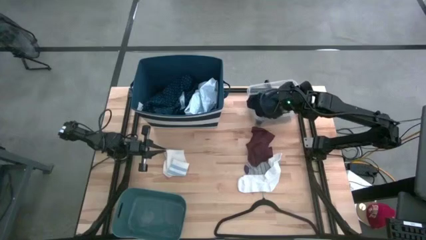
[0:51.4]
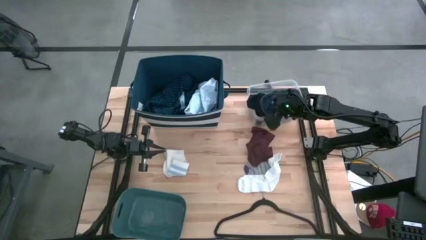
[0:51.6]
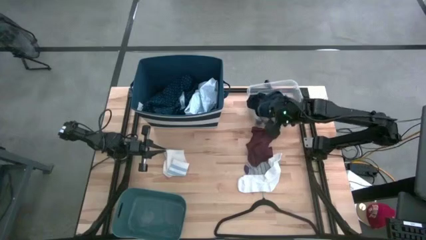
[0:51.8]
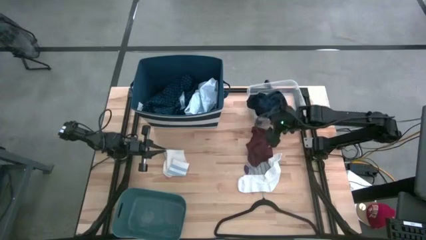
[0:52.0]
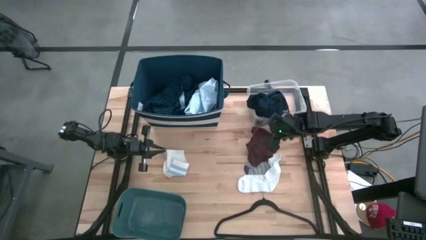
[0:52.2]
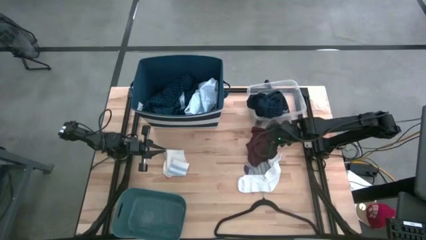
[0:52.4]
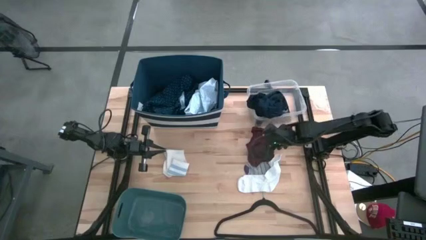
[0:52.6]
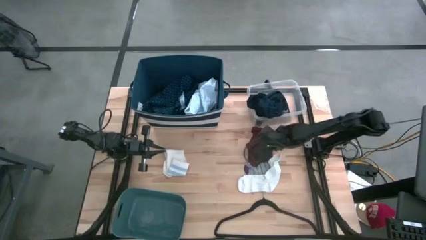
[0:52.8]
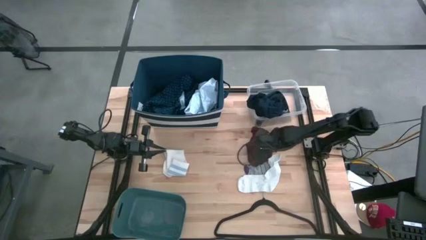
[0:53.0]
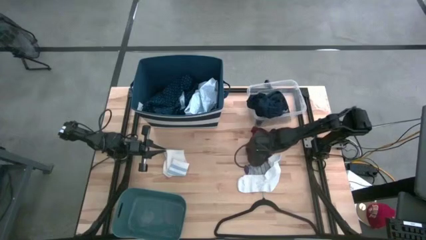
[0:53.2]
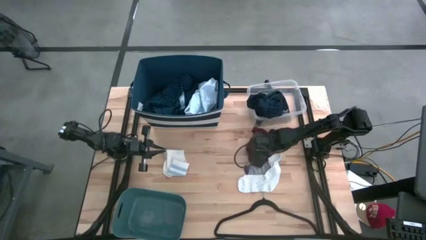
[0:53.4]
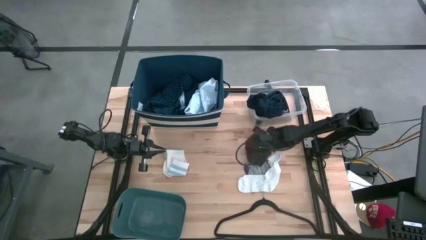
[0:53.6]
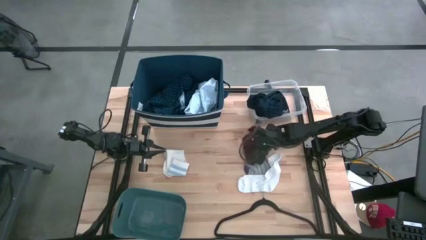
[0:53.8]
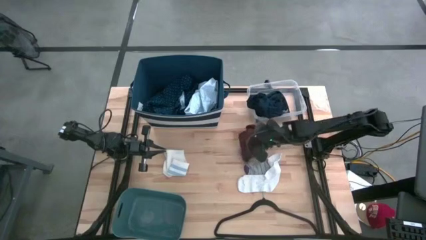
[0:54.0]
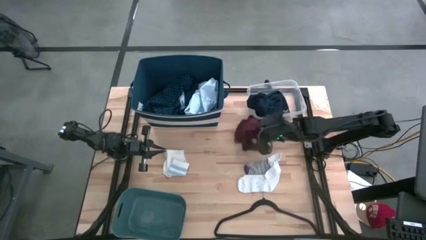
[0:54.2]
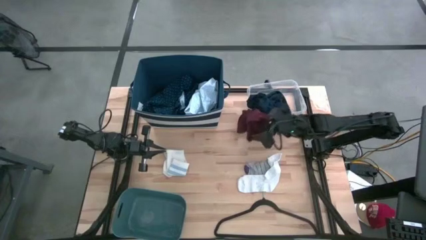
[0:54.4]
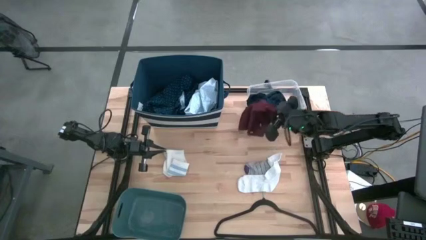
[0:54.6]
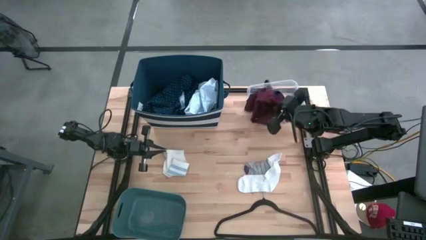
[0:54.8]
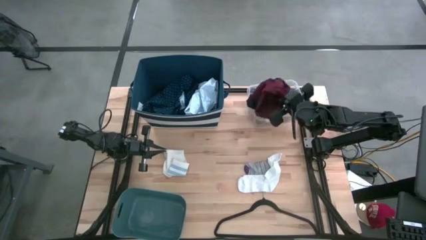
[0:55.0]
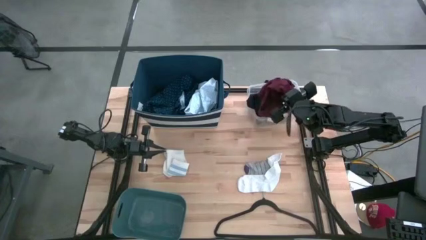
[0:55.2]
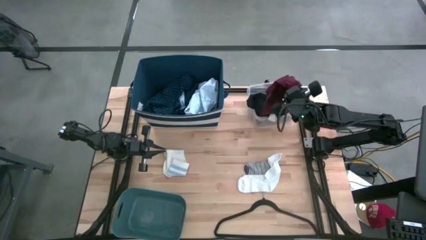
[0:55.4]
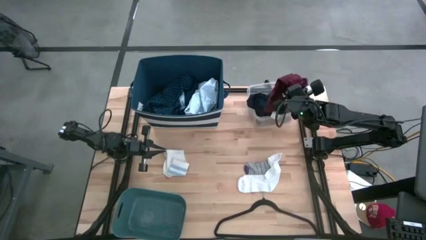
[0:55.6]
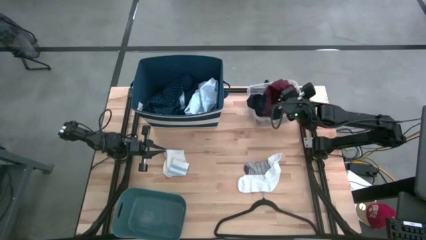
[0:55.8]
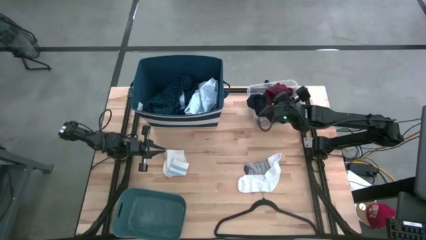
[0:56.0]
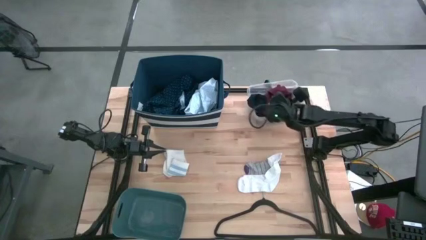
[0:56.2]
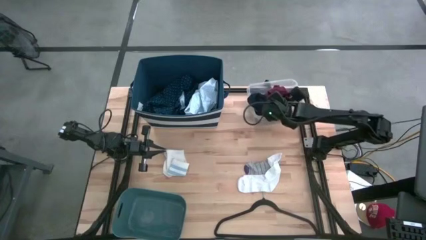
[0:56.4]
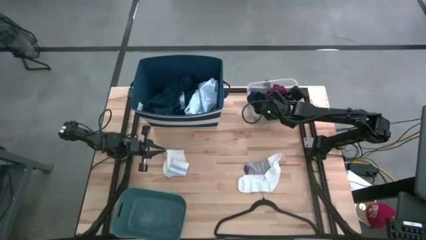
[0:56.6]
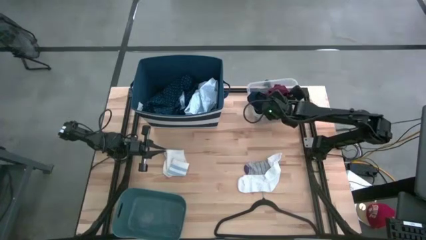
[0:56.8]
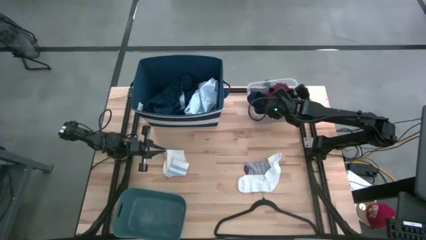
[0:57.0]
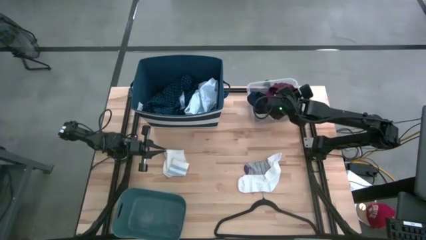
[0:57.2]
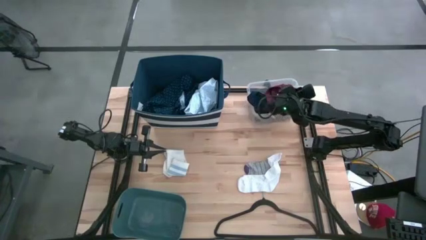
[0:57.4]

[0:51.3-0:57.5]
Task: Pick & Place Cloths
Put the red underwear into the transparent bin

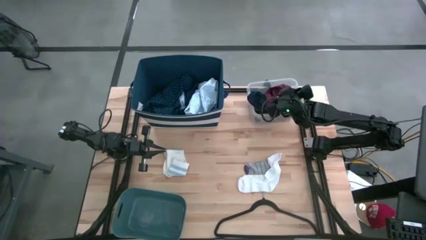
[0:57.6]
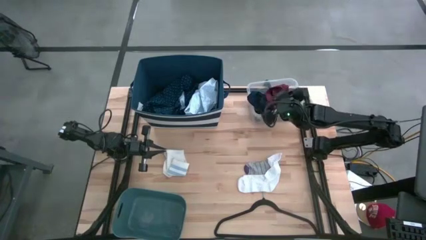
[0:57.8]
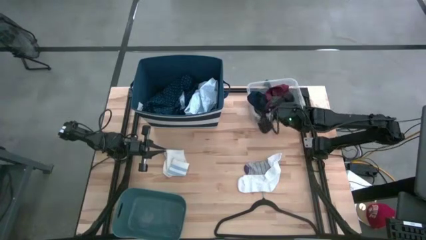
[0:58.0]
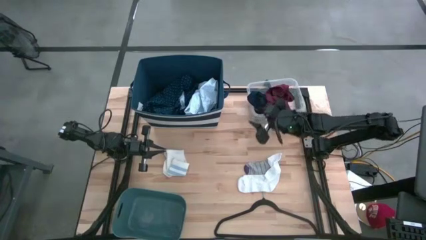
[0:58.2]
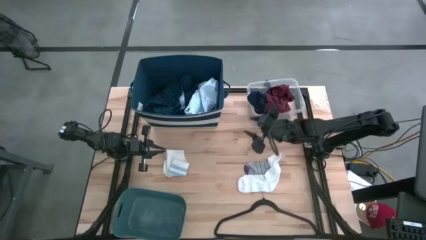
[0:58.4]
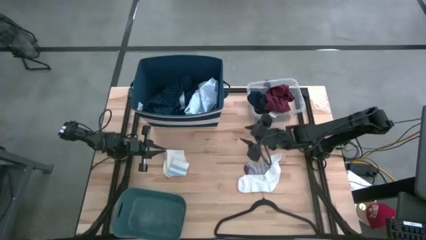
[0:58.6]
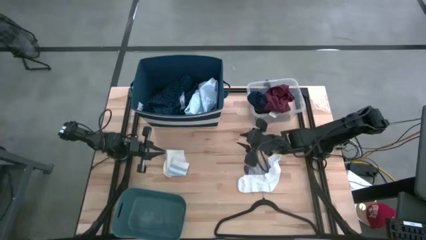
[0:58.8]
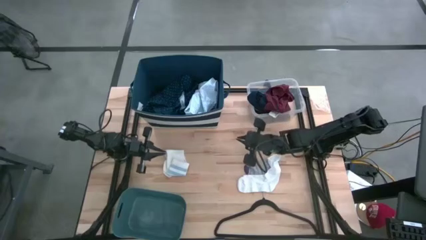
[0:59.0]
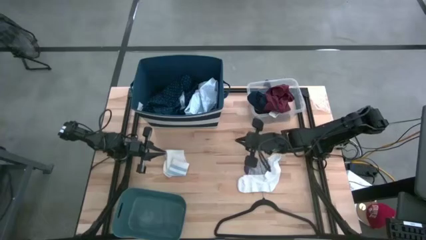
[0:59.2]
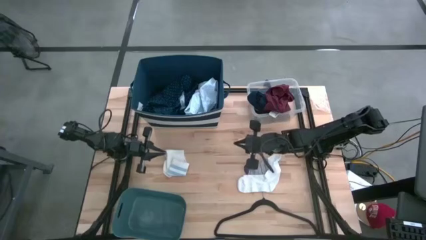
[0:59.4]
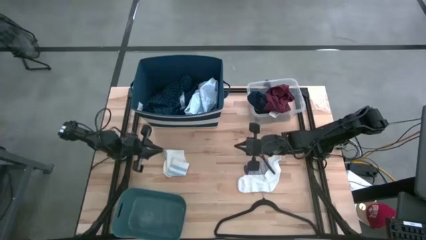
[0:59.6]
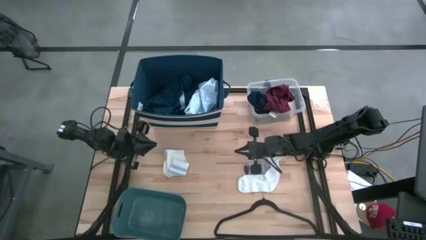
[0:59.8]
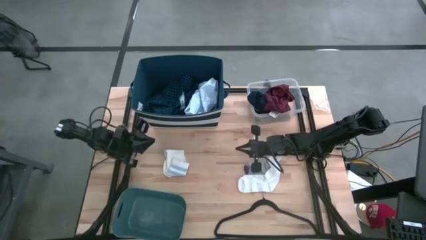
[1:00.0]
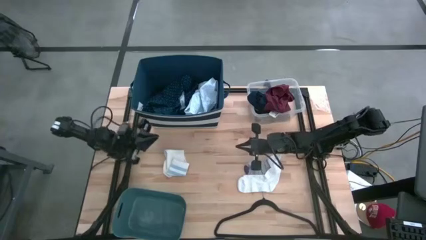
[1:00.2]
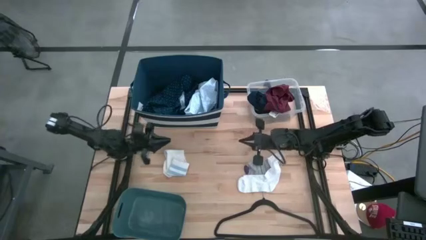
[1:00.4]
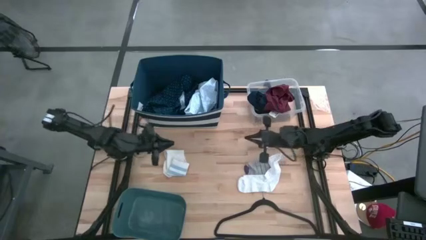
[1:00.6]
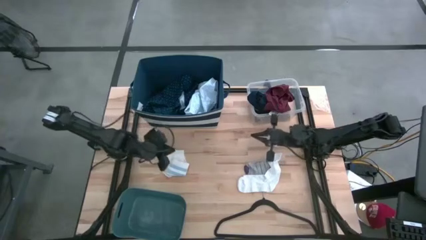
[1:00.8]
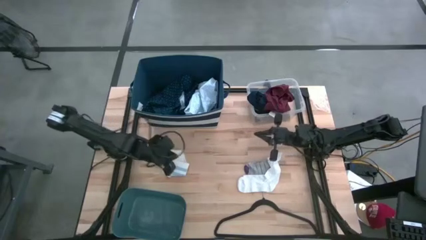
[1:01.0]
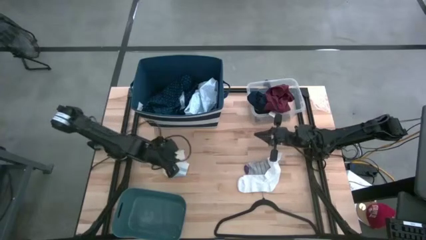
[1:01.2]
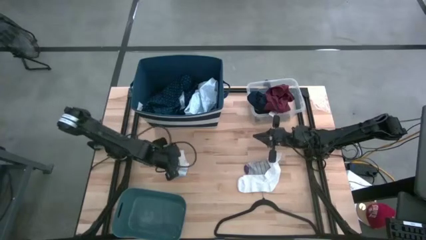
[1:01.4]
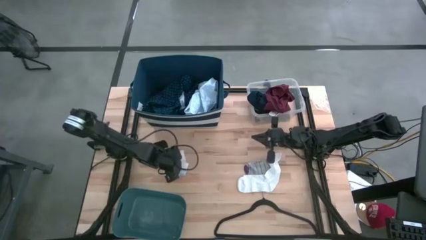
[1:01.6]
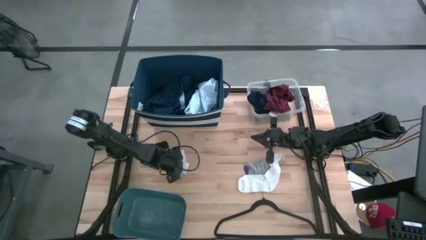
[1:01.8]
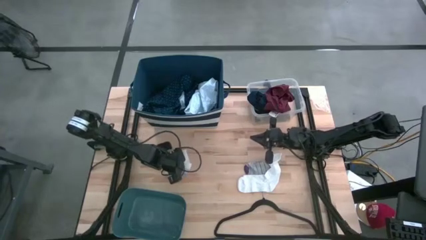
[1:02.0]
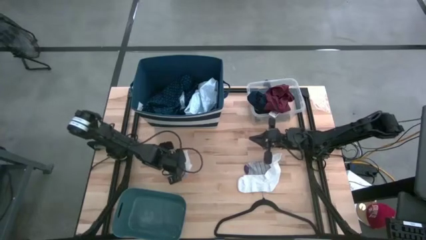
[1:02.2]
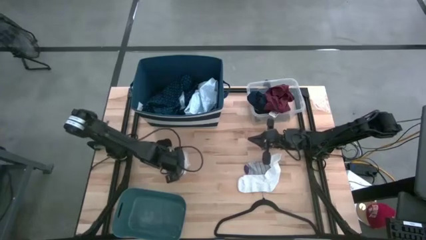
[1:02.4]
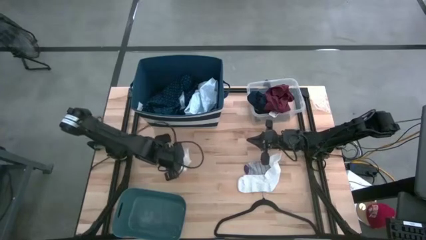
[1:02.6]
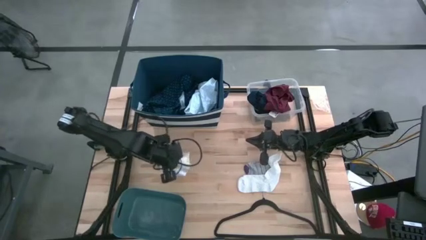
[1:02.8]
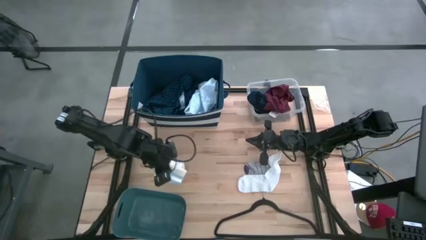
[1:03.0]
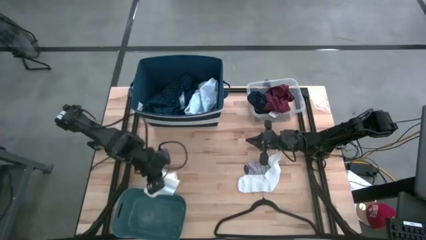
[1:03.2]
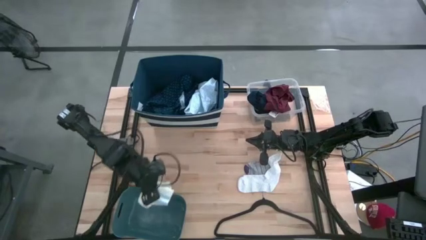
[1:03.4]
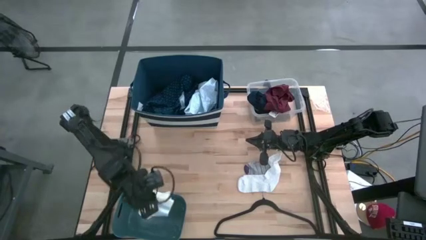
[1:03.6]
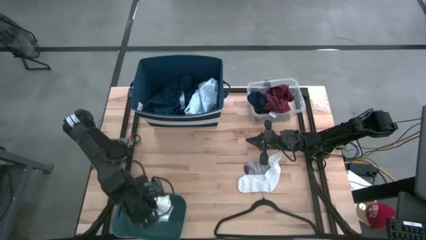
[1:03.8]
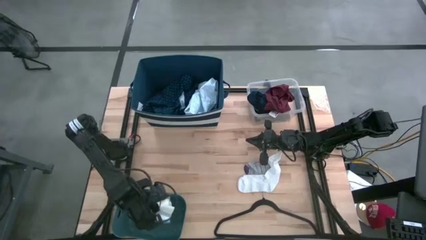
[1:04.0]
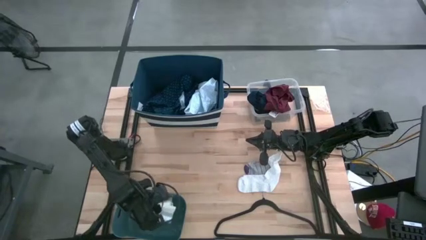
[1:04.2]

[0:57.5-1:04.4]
Put the left white sock into the blue bin

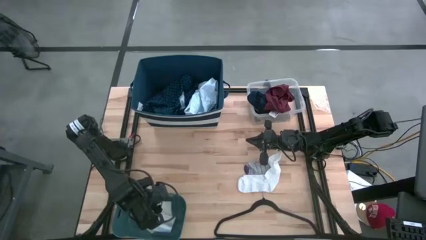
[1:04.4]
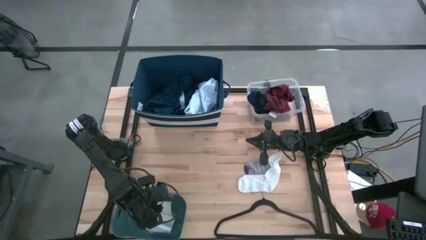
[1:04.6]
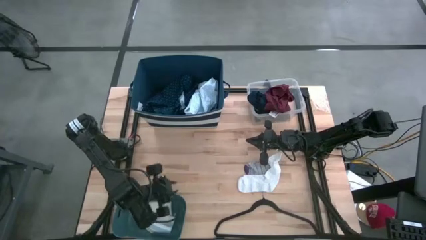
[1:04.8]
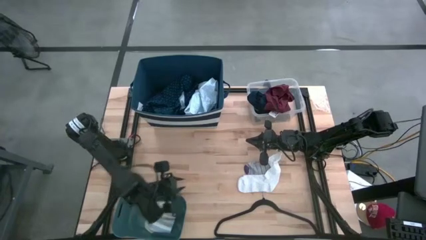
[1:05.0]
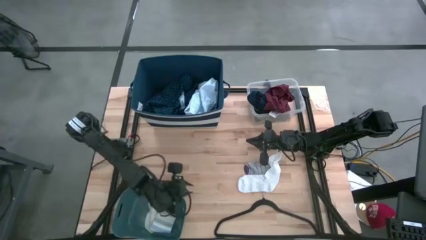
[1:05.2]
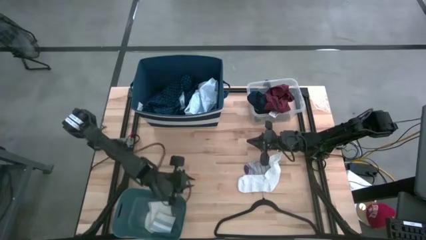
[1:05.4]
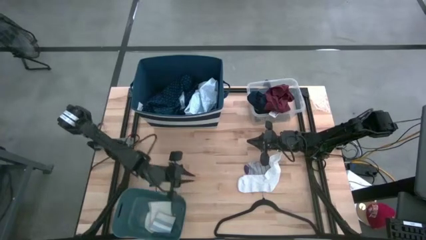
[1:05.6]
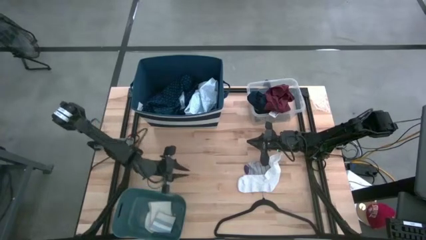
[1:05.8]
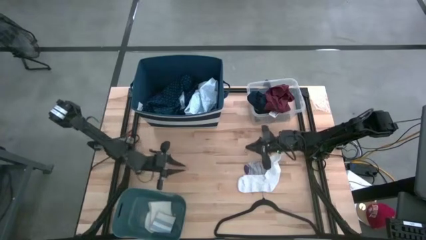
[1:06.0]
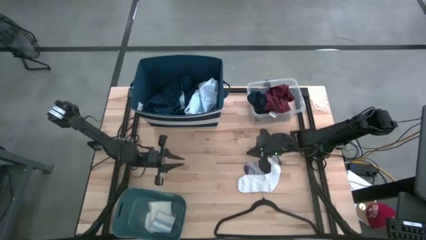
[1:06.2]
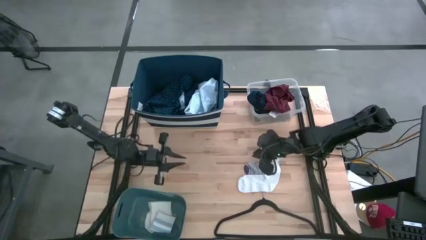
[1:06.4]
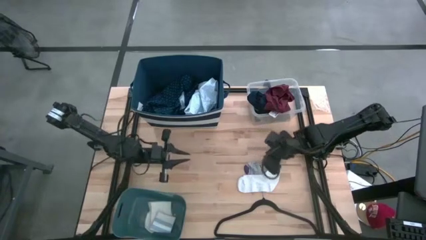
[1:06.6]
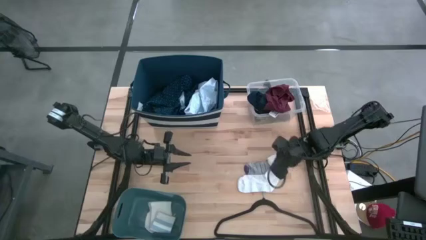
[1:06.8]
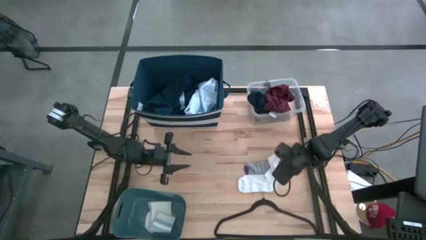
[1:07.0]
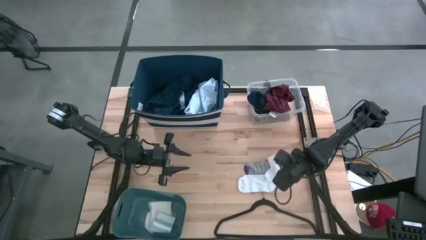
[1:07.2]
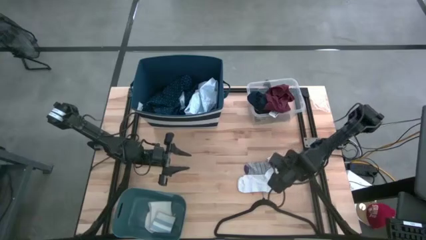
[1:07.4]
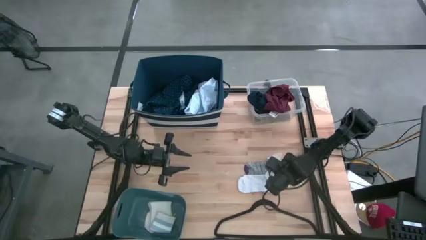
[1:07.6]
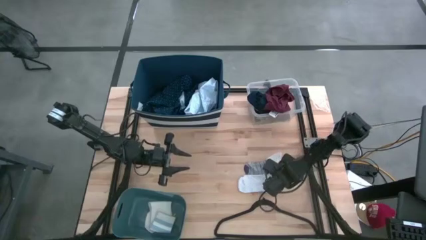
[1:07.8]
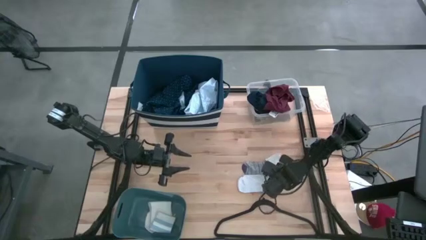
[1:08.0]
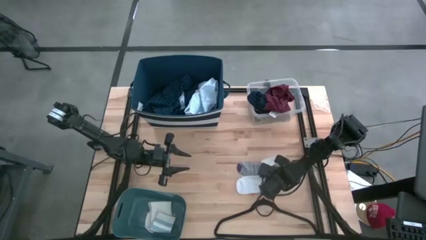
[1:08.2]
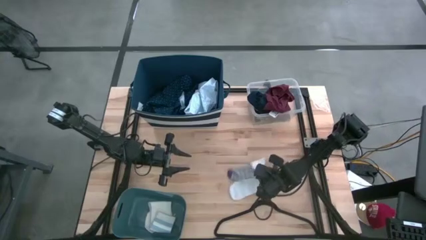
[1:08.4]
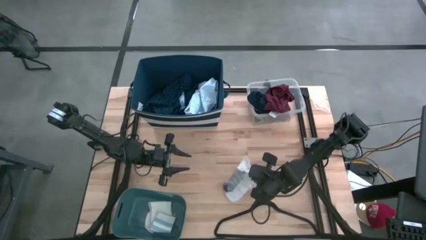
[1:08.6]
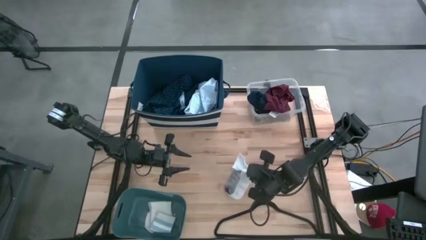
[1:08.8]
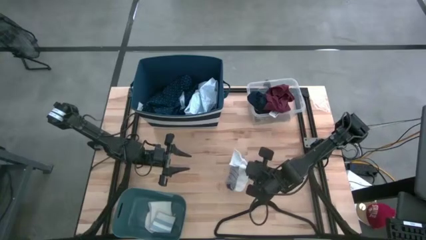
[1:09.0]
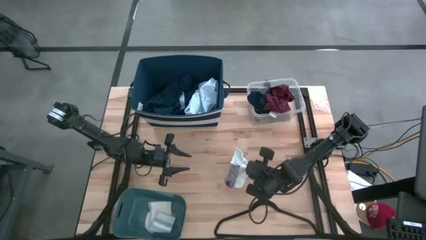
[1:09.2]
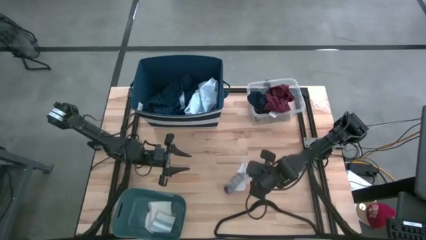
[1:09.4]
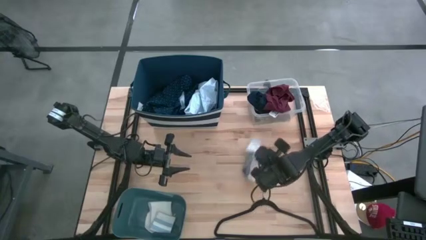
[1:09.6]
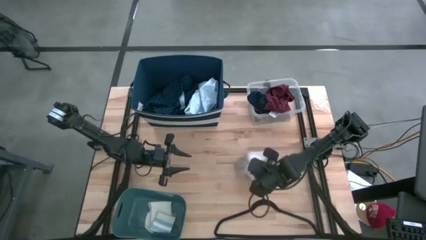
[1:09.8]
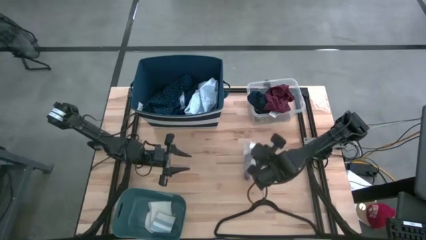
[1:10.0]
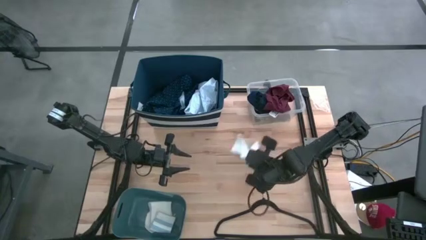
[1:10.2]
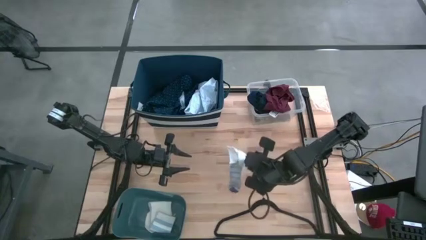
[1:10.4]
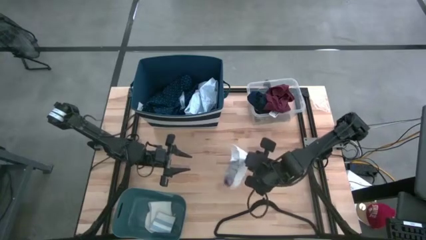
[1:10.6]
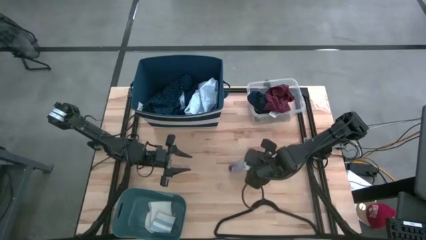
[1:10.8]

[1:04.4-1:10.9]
Put the white sock into the blue bin
